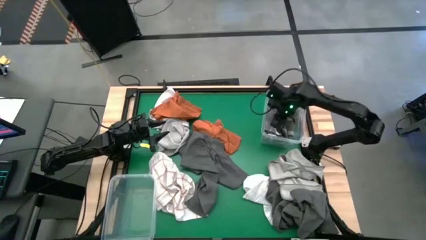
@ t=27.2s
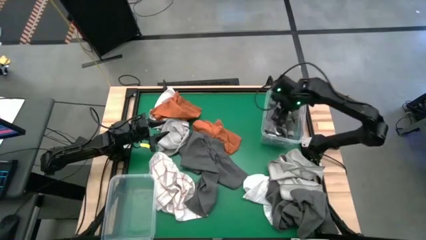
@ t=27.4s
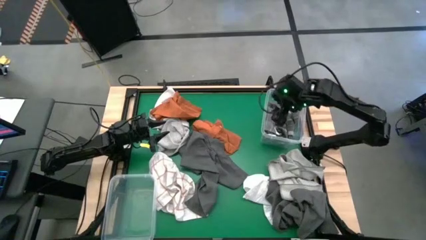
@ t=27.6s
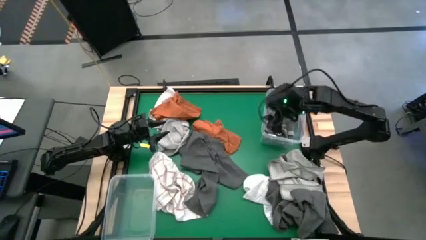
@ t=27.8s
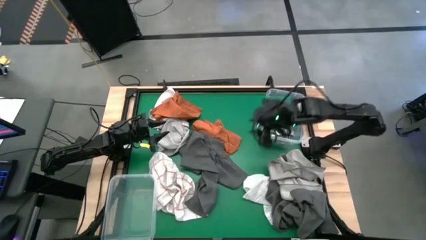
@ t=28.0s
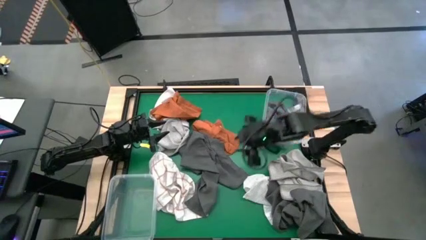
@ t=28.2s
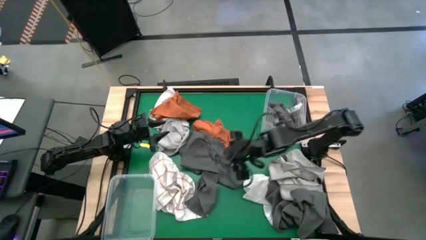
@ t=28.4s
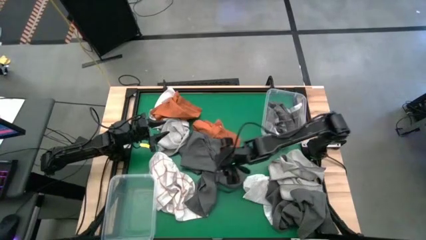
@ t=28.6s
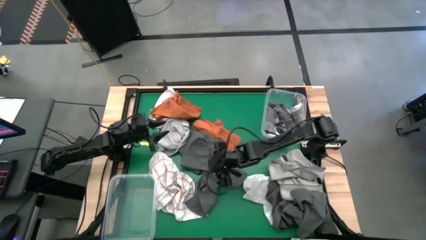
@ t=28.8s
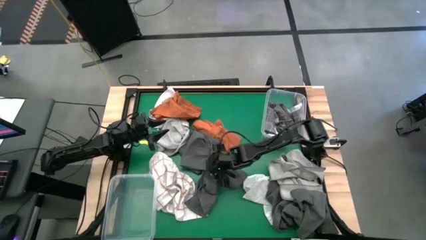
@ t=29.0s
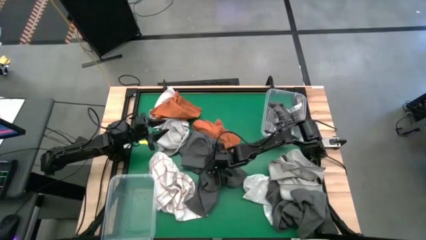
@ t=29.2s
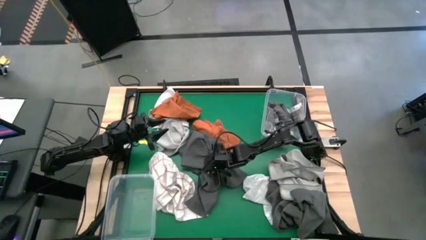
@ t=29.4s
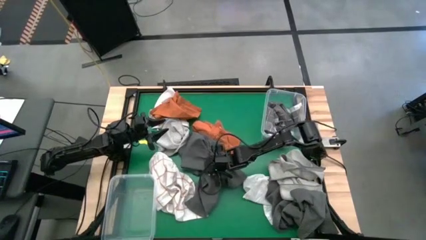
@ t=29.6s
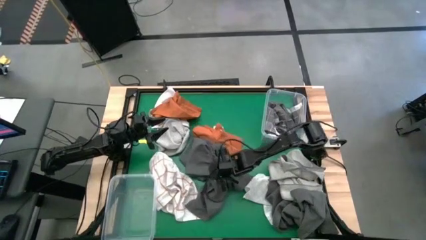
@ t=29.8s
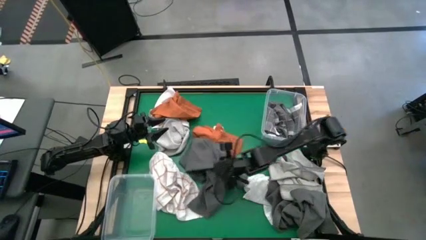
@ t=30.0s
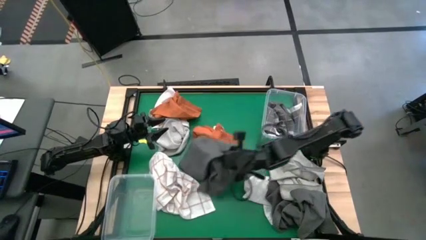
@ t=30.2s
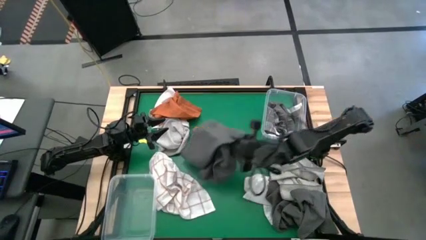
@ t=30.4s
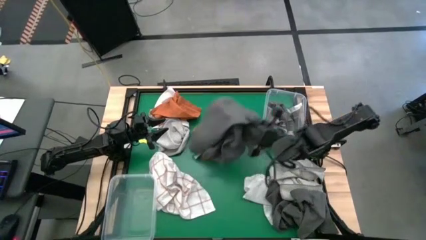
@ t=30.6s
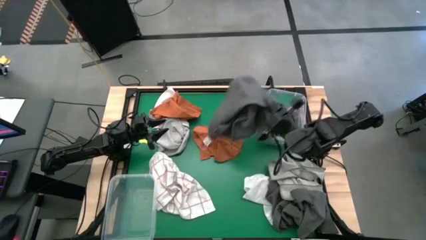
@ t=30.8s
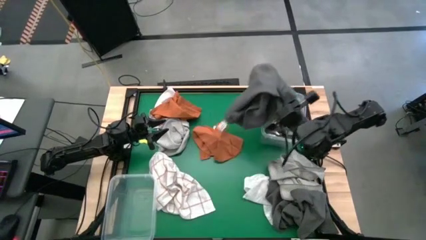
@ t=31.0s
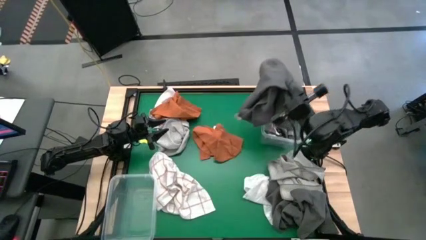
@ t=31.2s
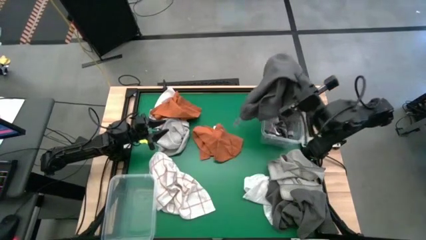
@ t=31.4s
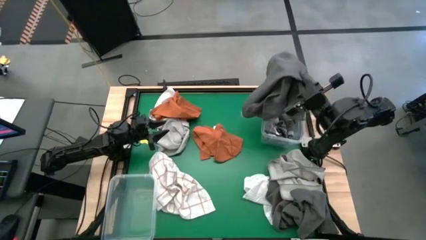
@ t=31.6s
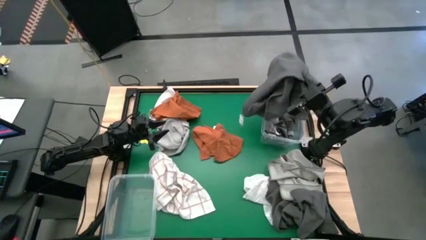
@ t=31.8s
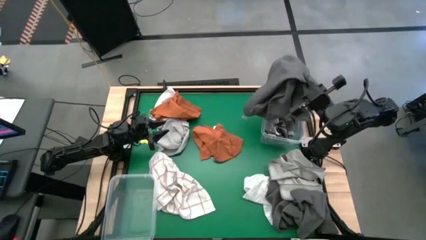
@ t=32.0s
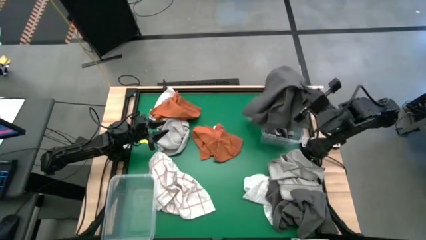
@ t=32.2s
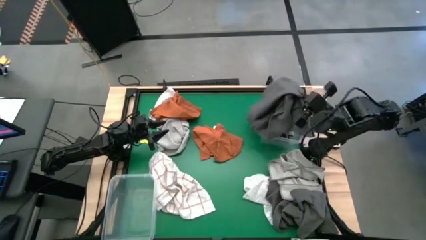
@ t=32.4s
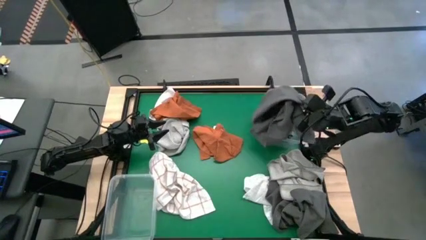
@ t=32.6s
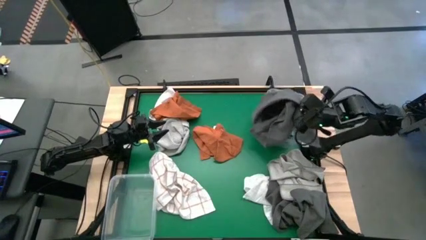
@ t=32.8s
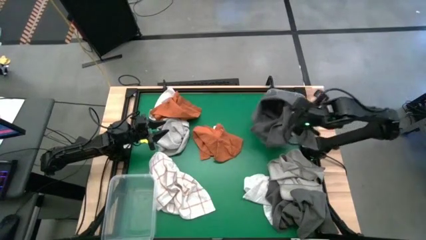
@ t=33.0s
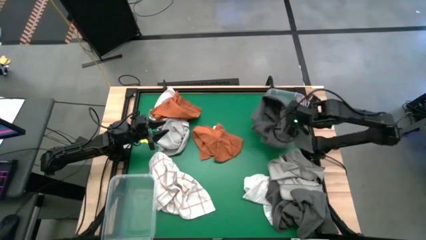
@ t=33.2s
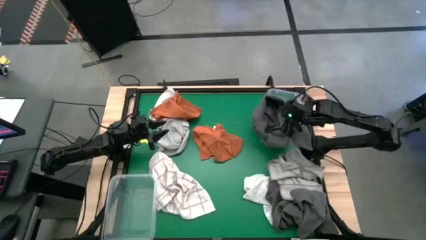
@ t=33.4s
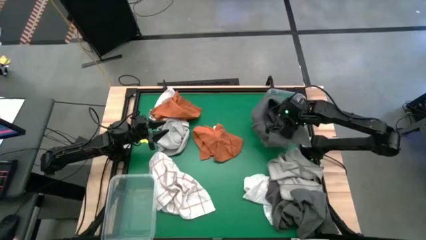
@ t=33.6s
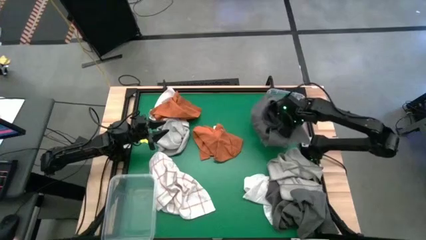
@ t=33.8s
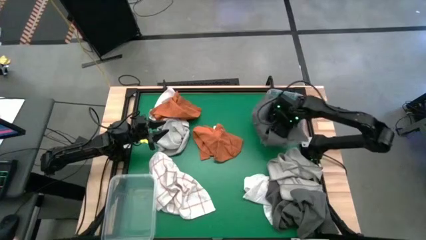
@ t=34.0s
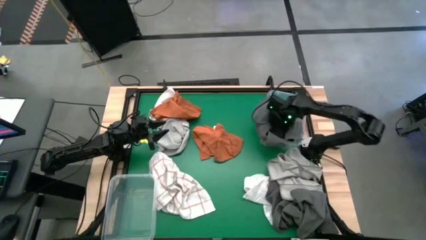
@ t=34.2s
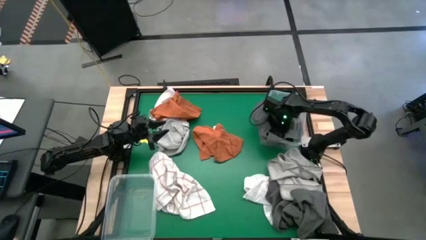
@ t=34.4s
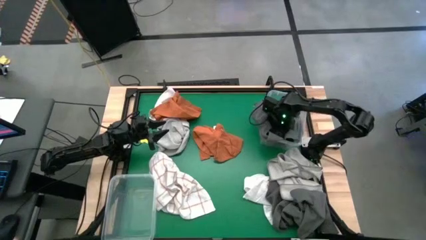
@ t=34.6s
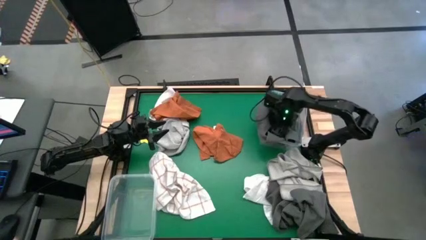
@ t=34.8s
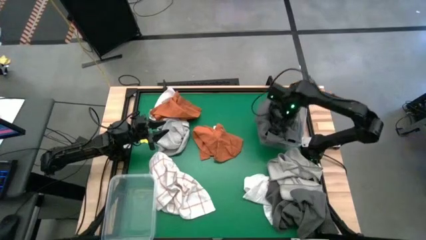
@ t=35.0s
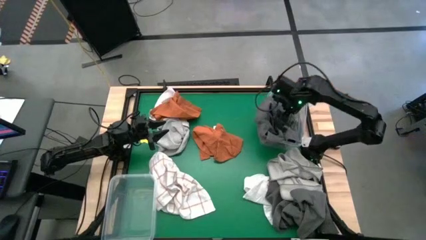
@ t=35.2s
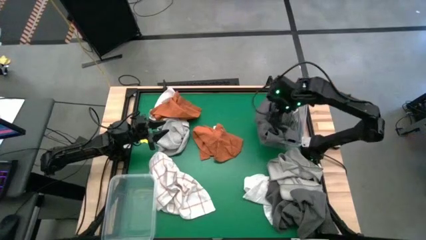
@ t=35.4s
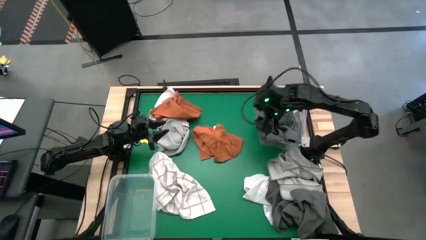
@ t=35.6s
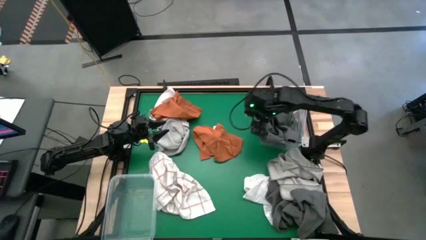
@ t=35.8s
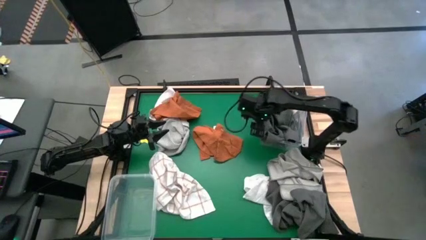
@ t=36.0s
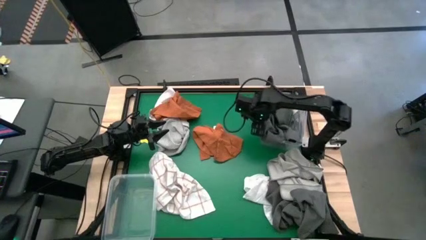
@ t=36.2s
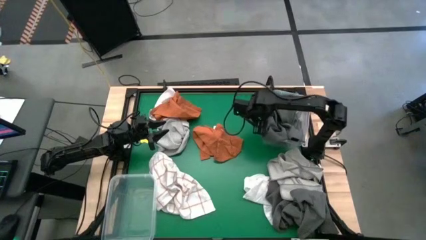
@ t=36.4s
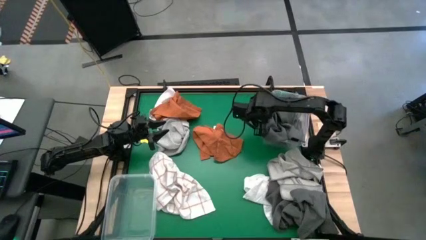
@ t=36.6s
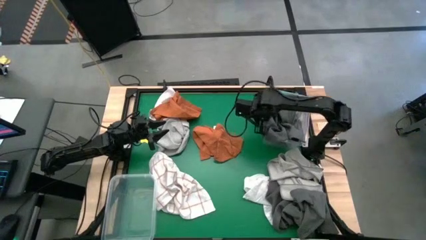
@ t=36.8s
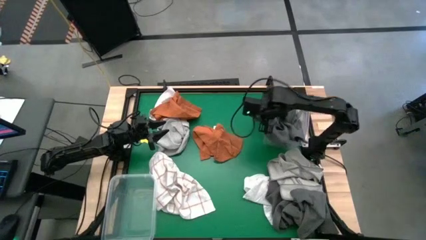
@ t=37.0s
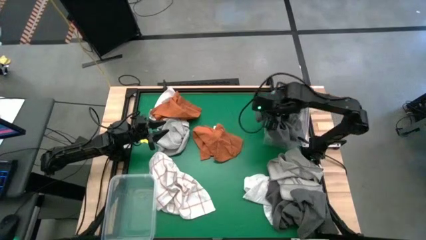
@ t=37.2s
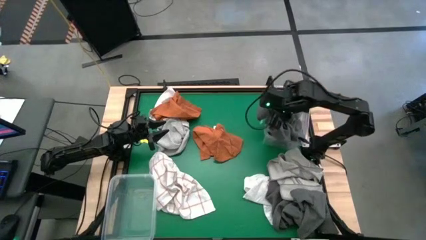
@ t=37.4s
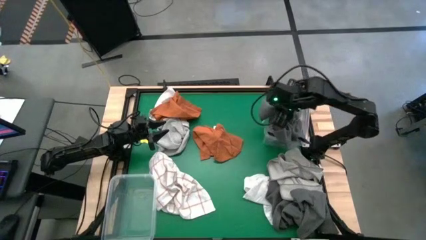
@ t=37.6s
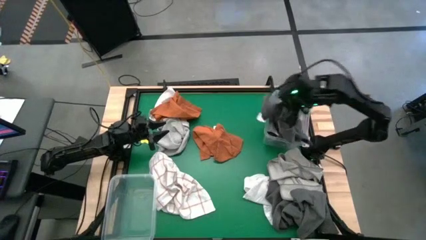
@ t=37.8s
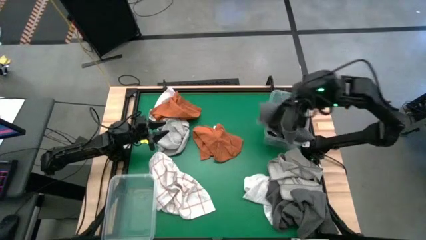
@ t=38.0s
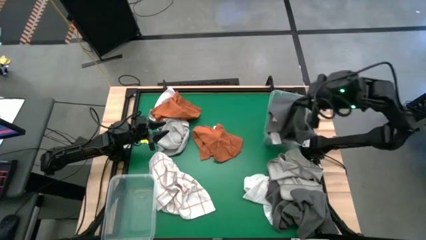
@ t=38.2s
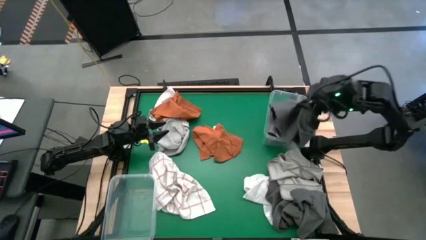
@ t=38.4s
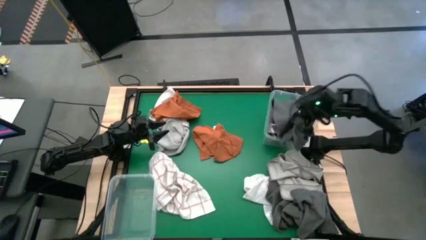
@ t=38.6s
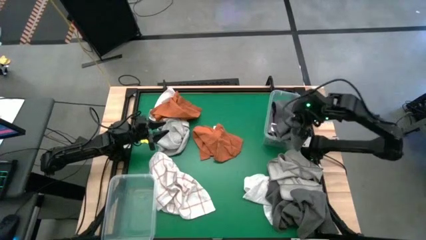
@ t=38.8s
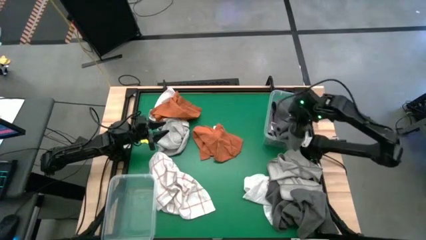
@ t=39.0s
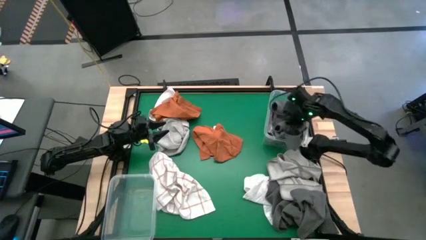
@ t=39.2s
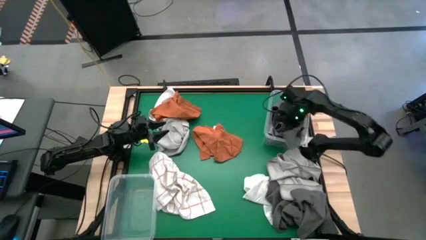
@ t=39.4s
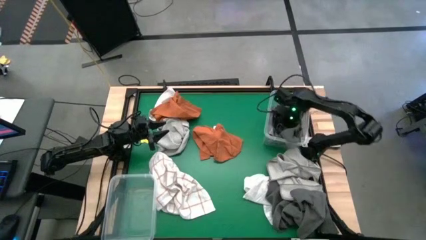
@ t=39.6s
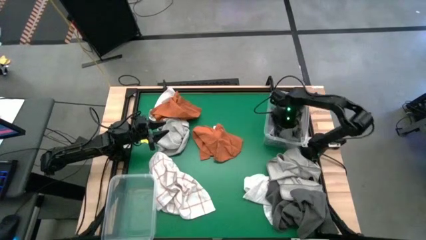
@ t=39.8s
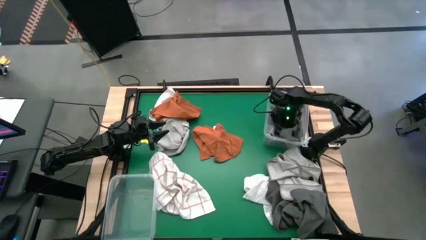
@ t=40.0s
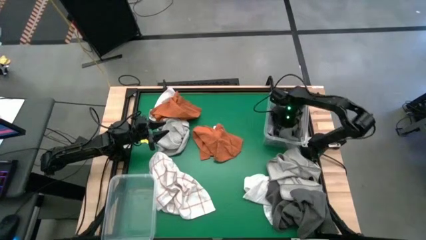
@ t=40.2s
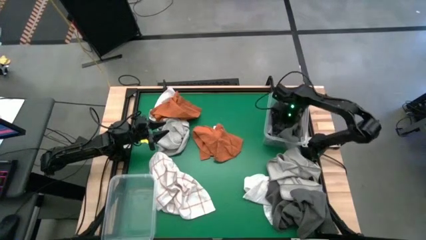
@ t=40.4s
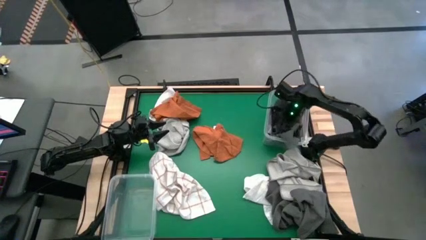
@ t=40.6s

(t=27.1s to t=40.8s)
Task: Sort towels by color in basket
Put the dark gray microfiber towel into the top transparent bin
